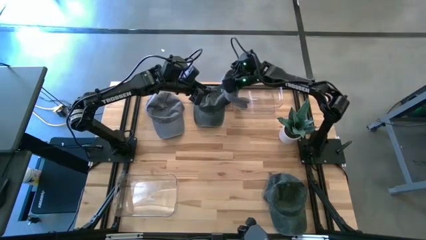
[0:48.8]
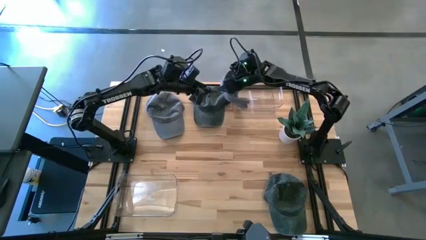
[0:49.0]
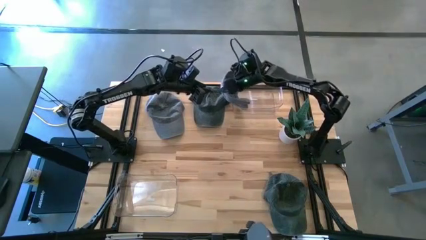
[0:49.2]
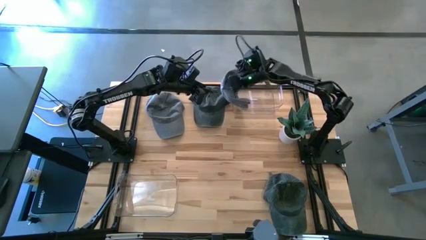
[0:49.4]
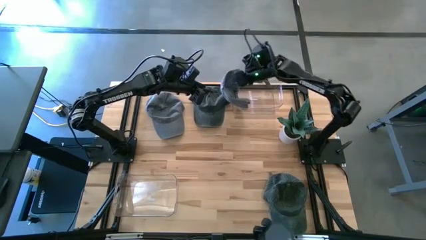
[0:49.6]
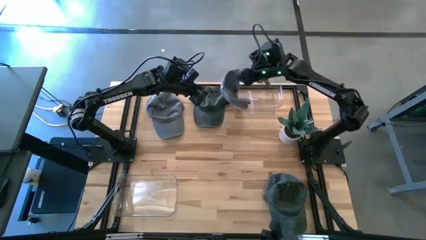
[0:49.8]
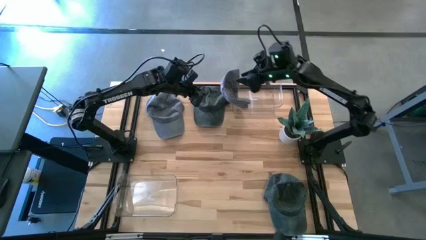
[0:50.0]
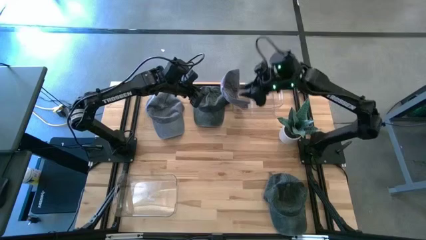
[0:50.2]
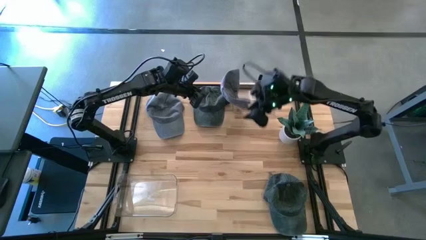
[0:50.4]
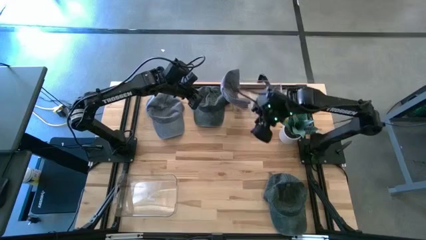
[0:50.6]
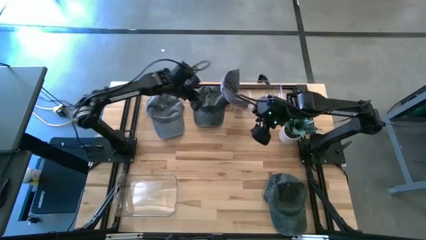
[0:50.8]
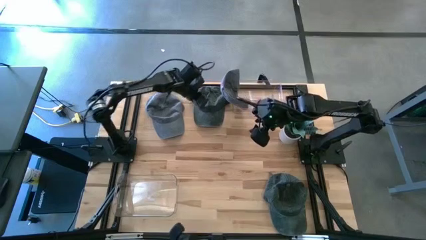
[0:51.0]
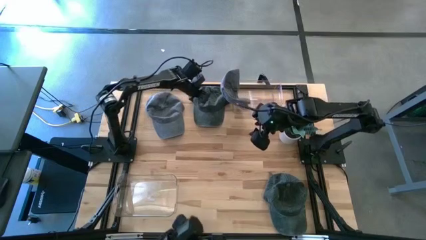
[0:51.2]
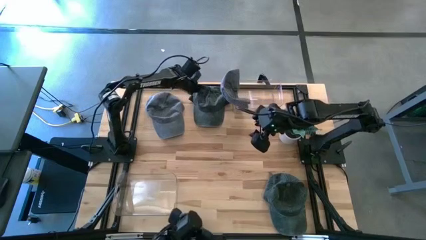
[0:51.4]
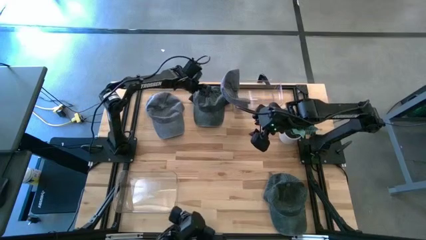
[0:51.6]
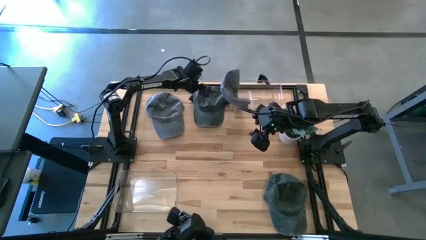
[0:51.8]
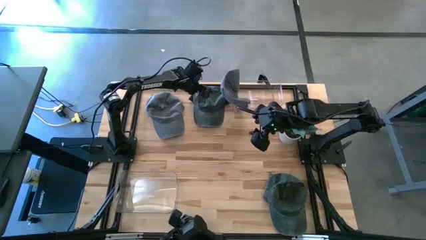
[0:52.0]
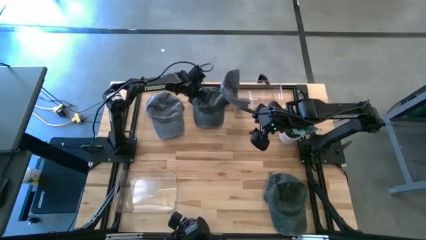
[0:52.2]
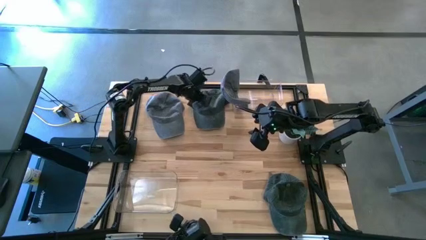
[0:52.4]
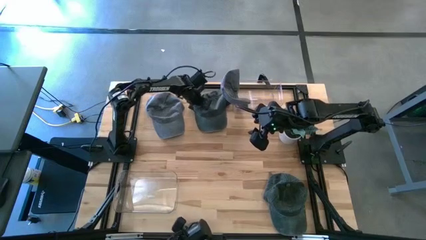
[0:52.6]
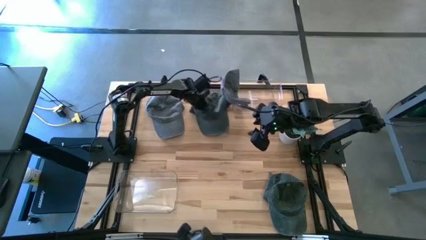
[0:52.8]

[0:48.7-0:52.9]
Task: Pick & Place hat
Put the top black cap into the bottom transparent bin
